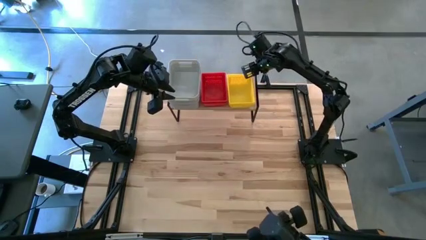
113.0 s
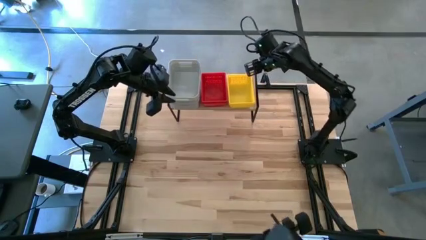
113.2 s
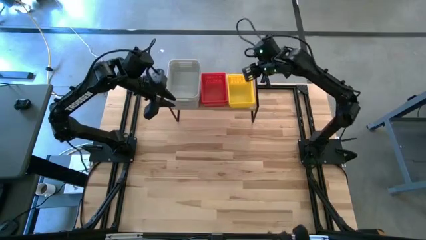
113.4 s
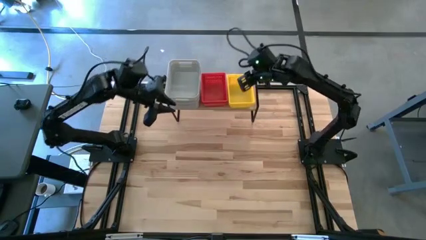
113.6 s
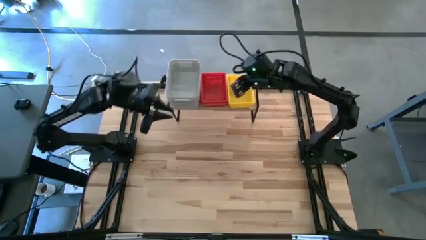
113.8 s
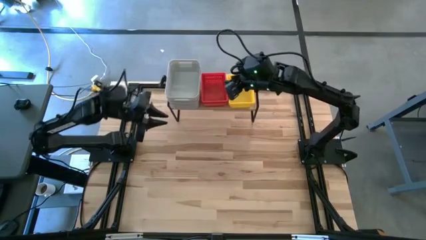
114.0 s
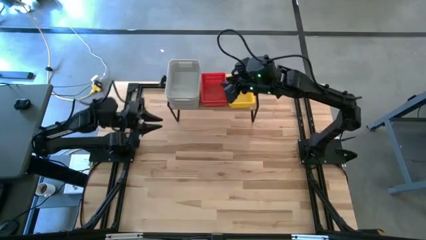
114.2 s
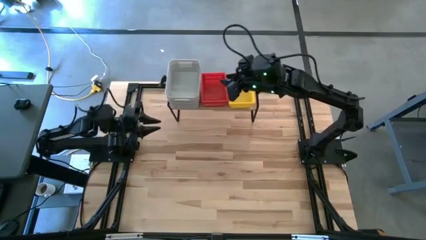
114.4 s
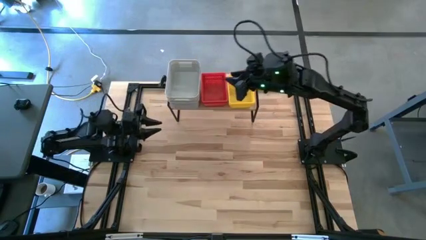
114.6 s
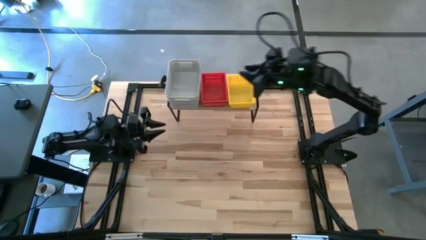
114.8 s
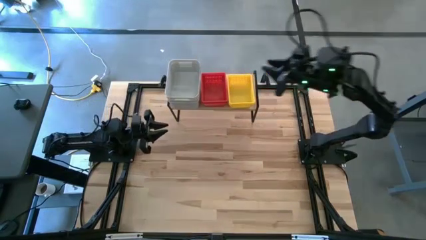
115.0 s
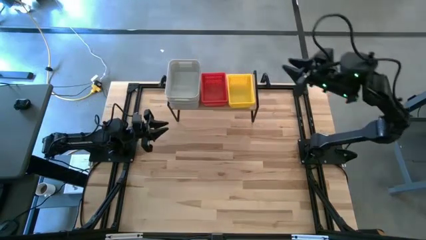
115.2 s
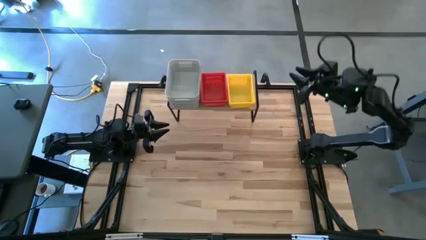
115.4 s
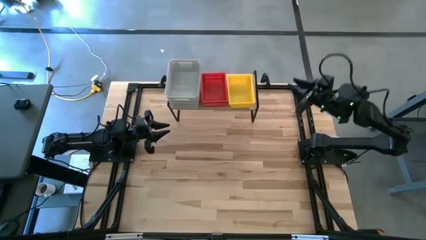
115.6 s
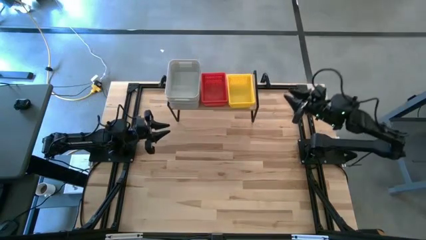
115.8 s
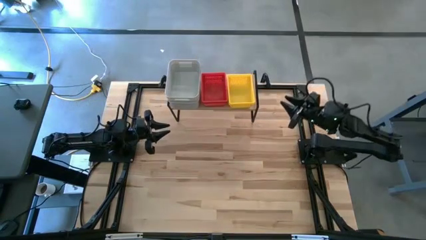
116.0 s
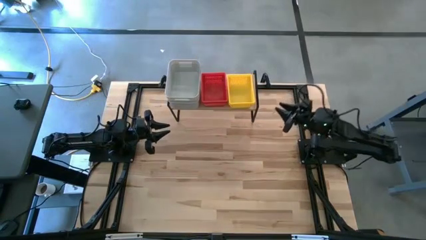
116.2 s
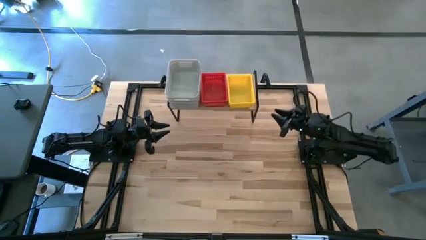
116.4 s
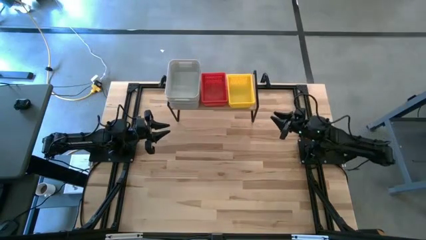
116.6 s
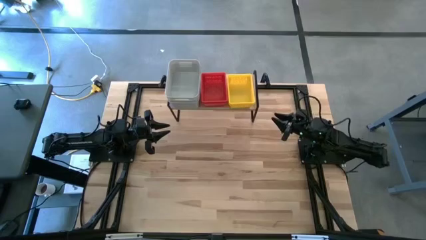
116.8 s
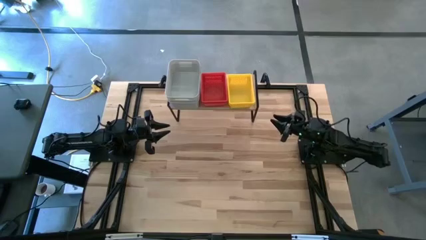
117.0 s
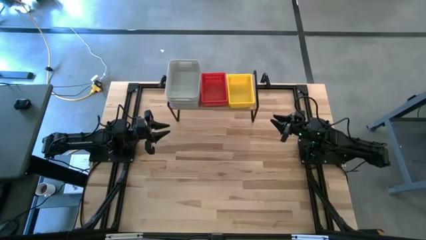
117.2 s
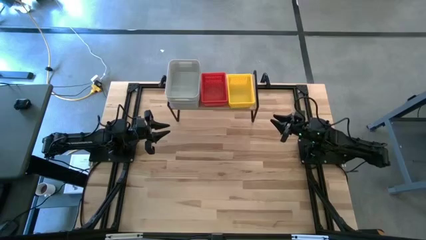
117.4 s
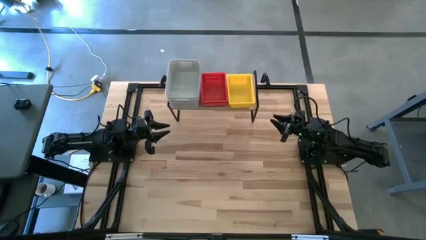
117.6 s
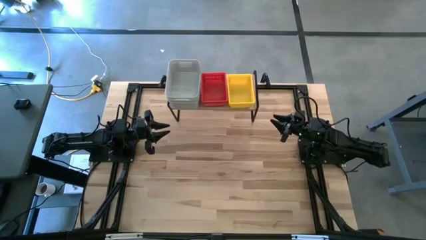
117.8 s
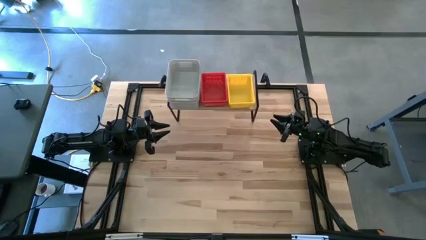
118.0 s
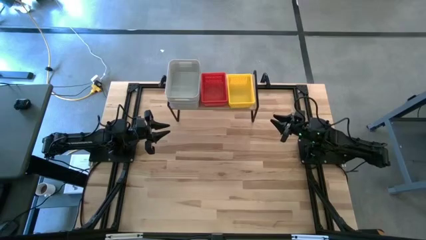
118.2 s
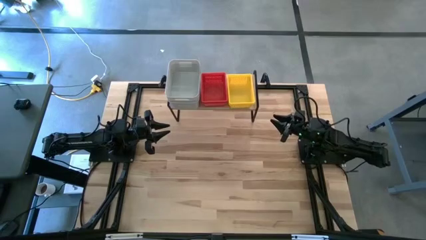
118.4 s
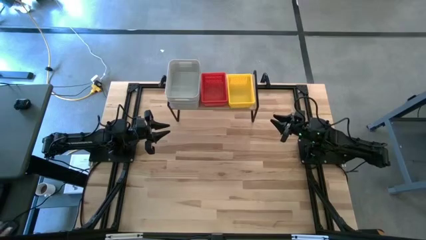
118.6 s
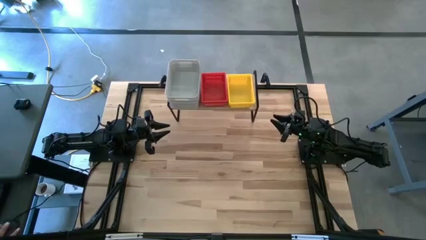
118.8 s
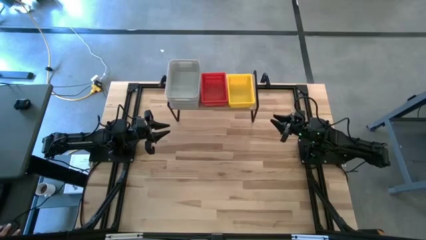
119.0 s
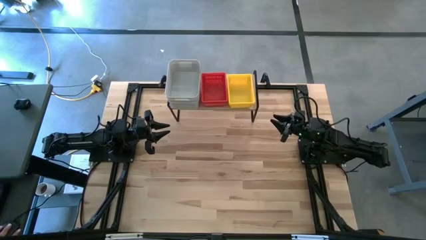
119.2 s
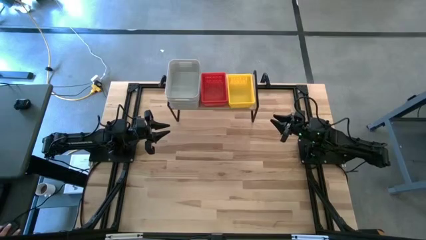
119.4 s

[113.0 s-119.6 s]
Task: Stack baskets on shelf by color
Return to Home Position

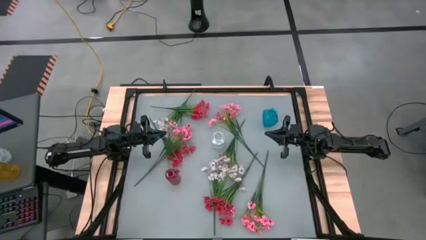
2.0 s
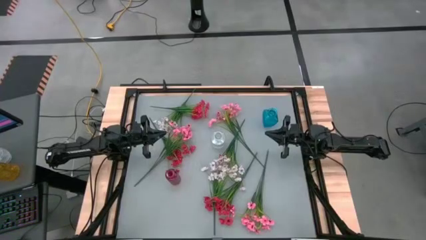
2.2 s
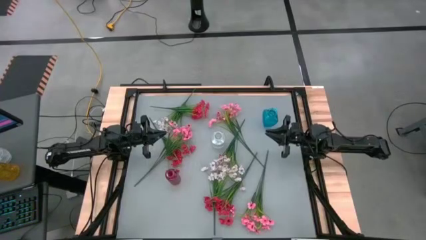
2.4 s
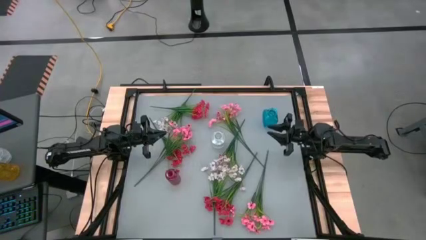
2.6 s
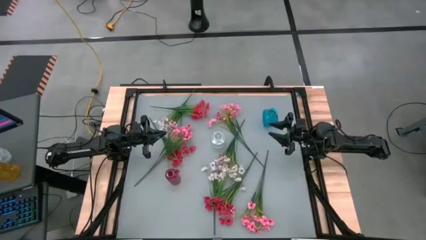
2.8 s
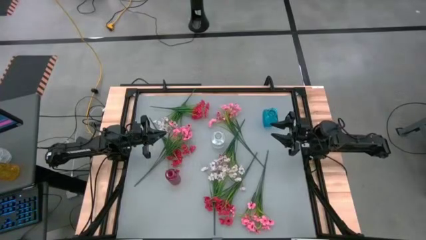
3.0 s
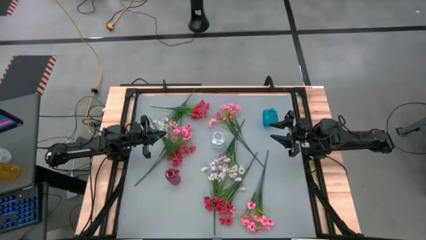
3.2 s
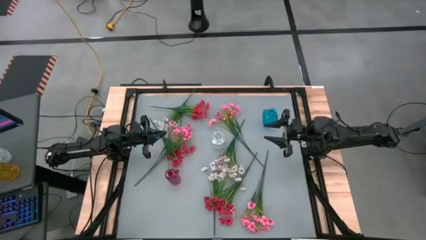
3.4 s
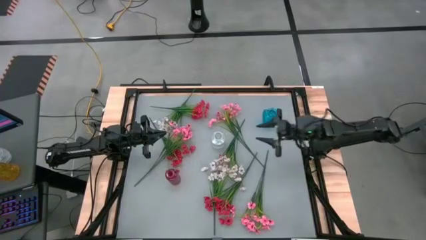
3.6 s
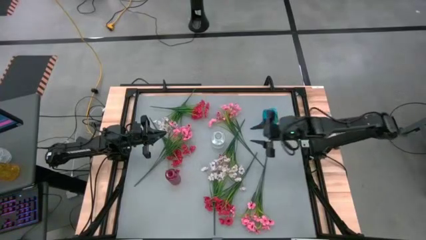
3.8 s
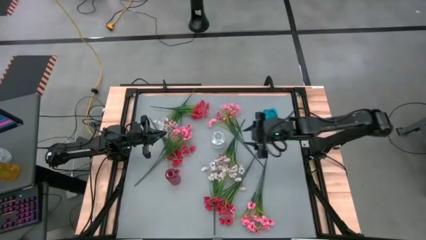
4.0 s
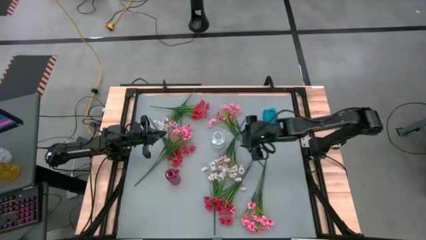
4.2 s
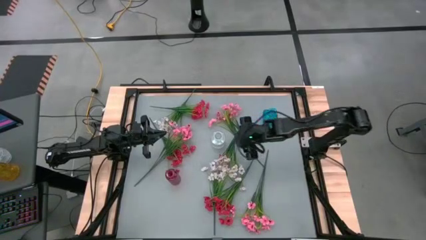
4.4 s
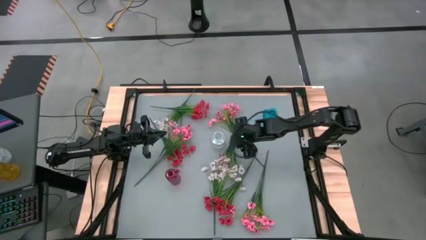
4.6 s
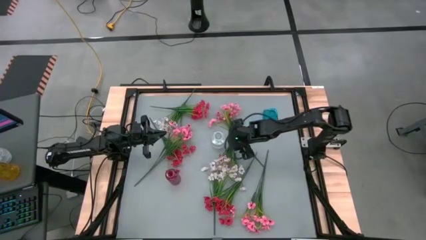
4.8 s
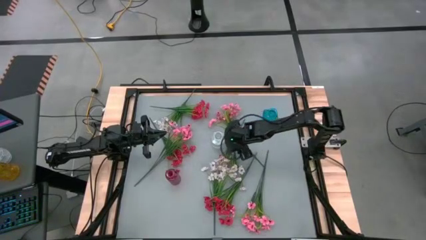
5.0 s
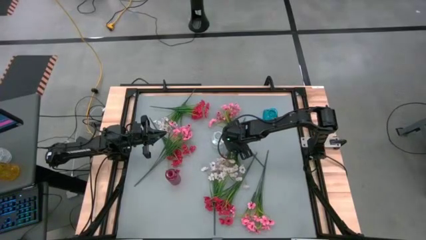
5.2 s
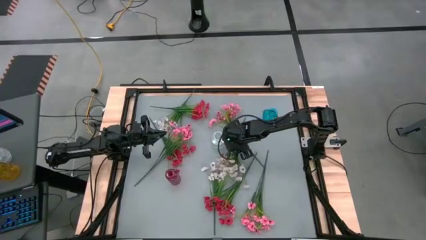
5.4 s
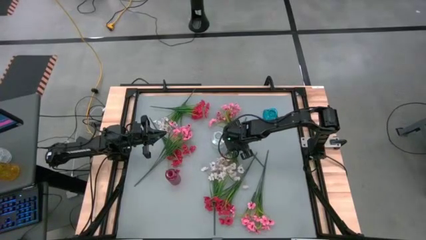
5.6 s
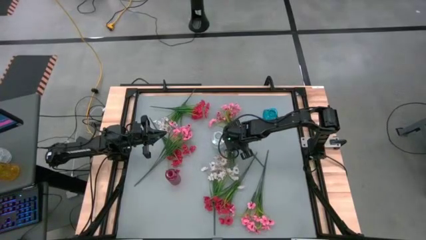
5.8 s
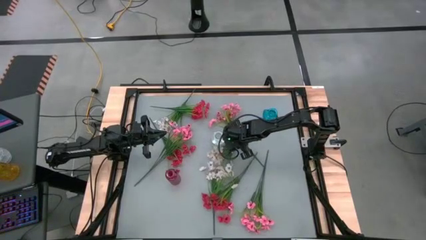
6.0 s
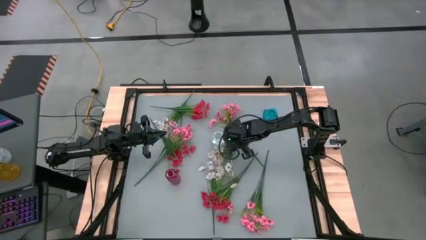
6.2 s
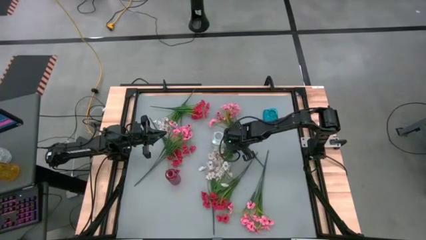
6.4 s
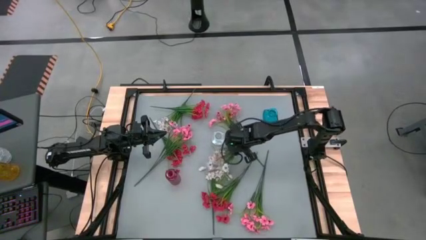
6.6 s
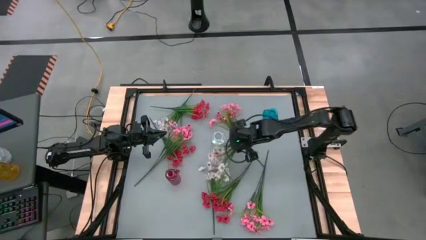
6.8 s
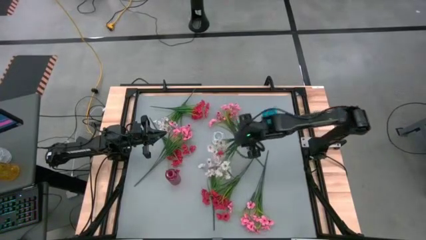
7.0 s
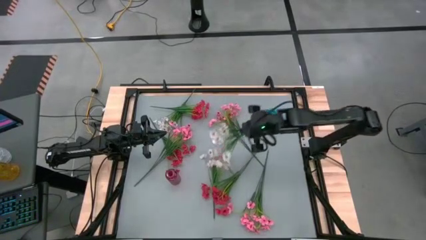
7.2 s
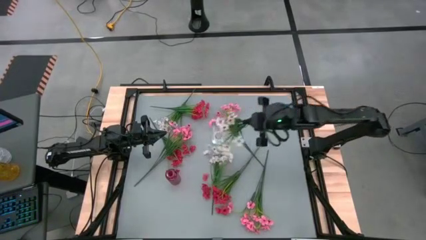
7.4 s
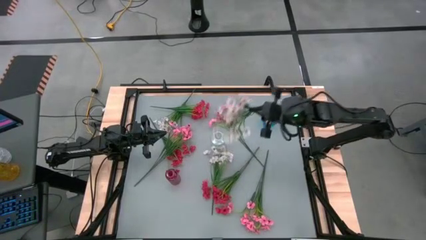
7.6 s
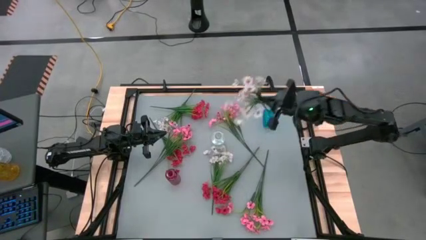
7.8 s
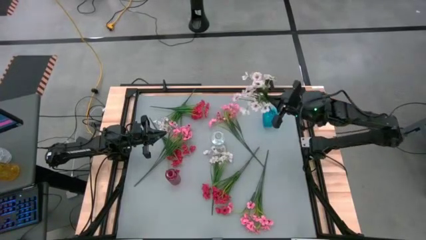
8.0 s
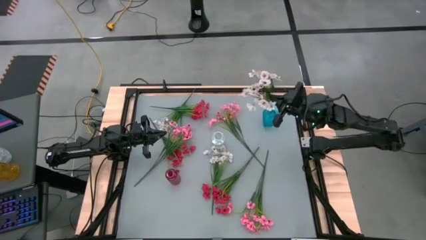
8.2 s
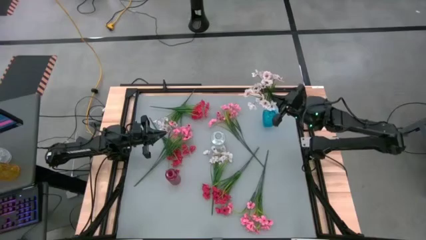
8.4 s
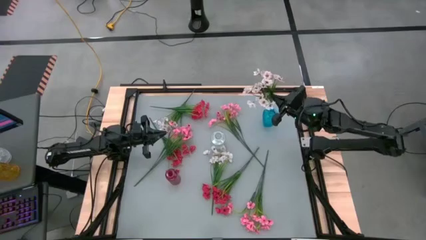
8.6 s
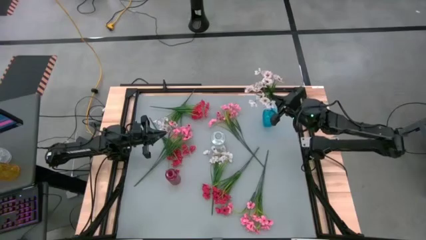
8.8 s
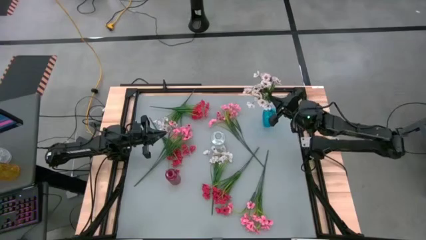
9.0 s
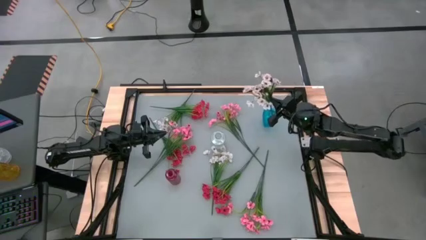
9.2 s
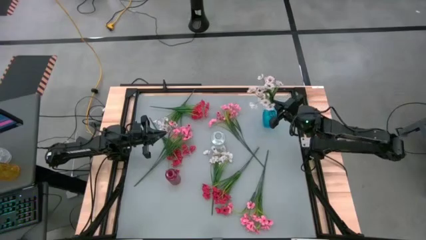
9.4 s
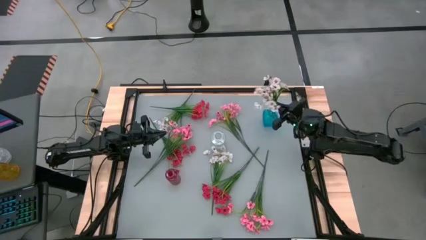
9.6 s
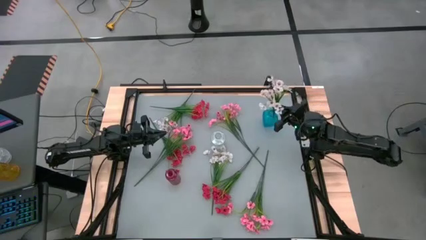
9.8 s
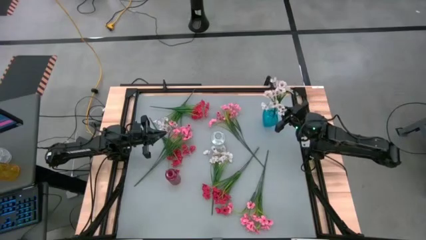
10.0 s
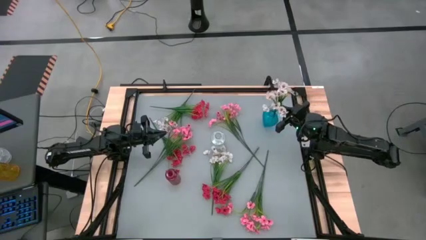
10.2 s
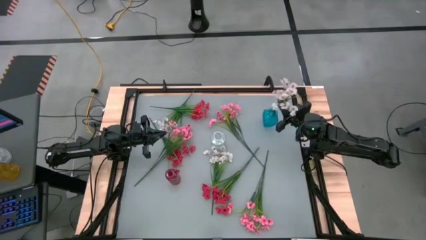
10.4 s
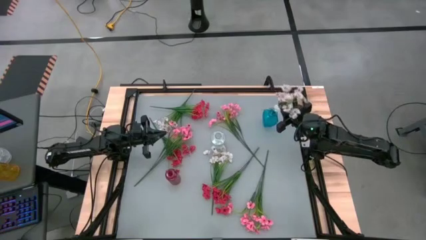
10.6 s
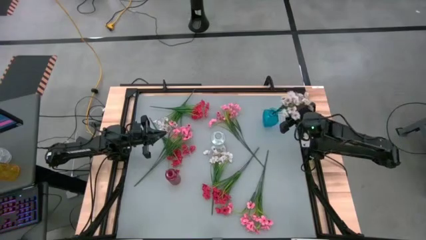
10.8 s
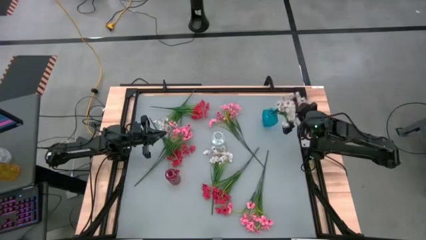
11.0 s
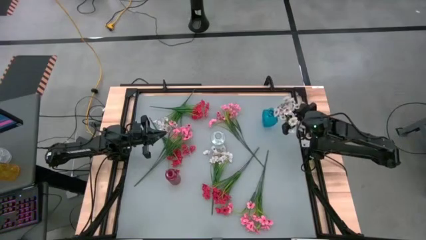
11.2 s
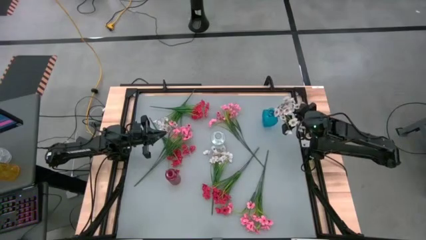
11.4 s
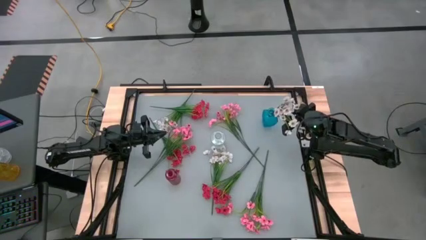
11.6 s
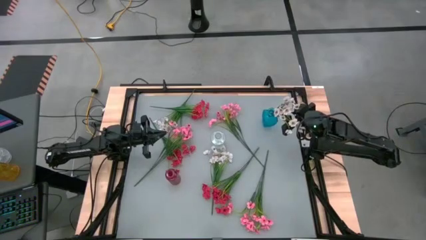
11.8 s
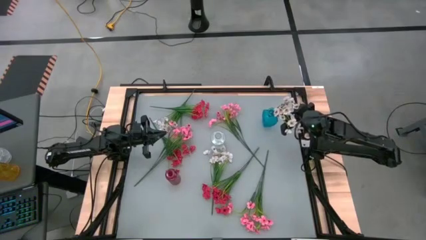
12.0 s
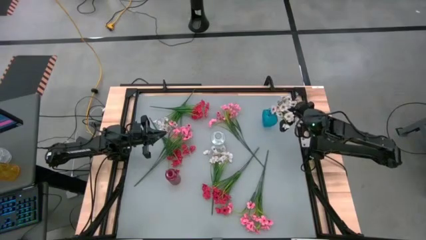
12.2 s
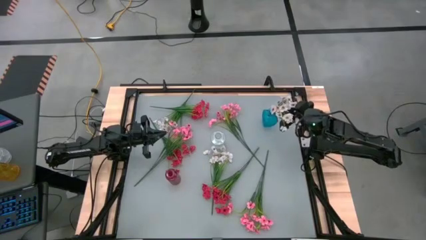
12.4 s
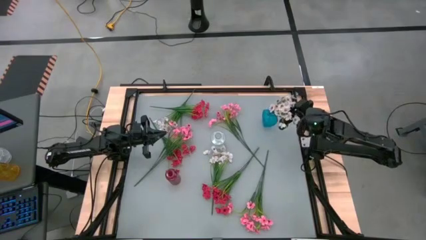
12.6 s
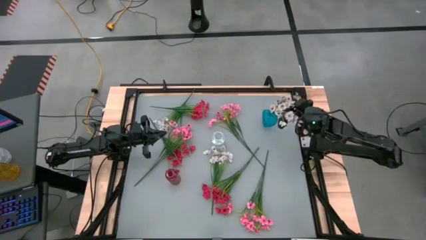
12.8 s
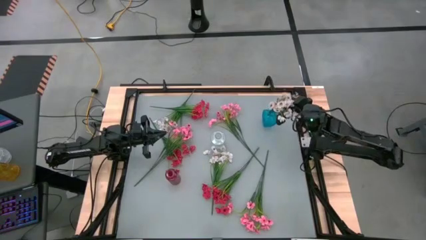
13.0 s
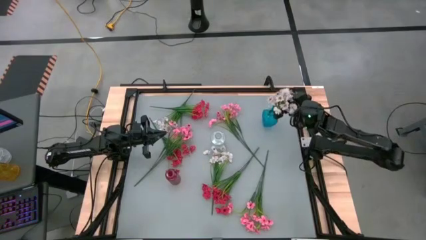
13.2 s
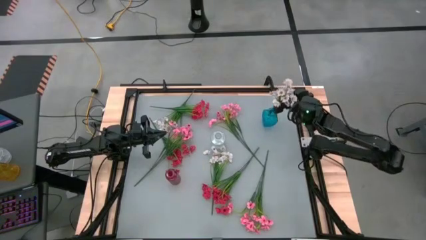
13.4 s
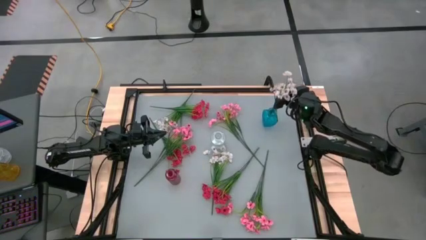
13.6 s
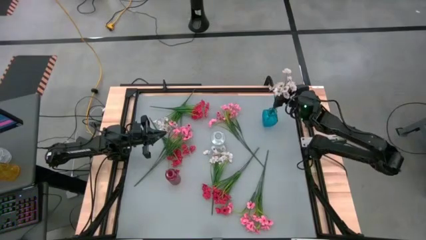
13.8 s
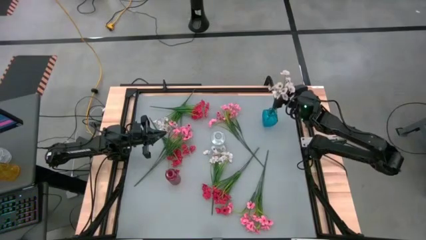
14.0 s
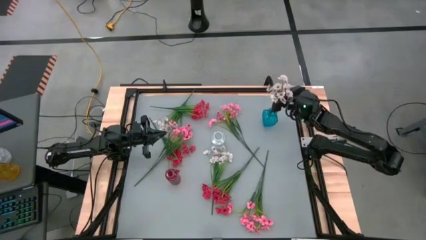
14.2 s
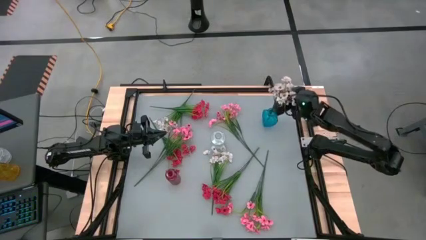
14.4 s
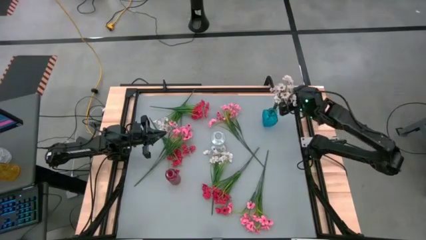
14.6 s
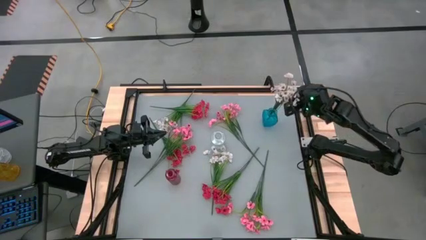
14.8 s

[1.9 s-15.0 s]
Task: Sort flowers into vase by color
Put the center white flowers into the blue vase
